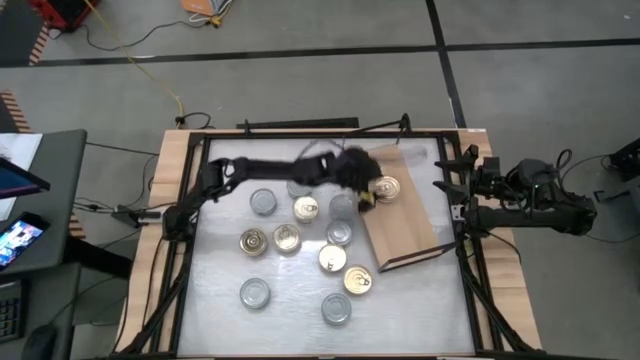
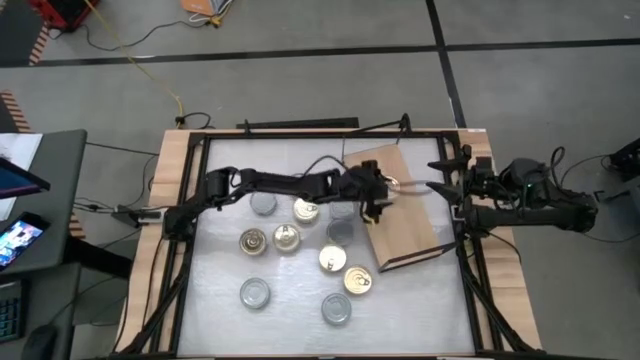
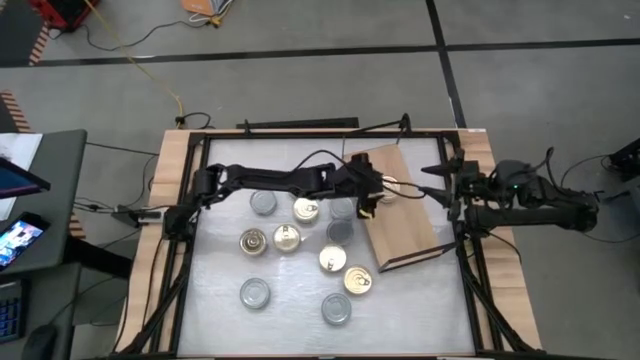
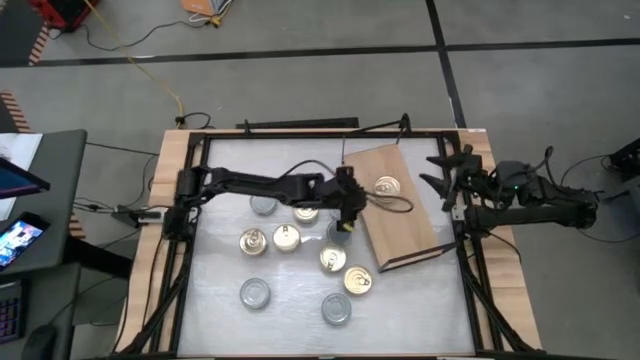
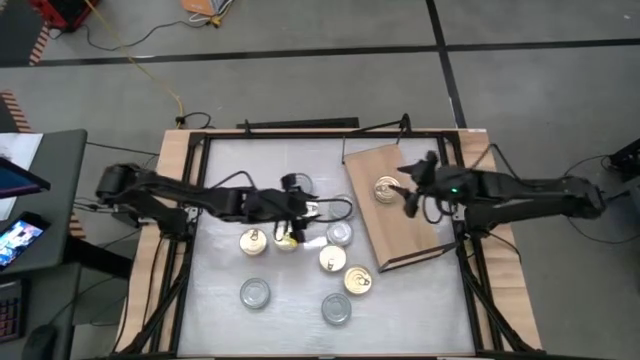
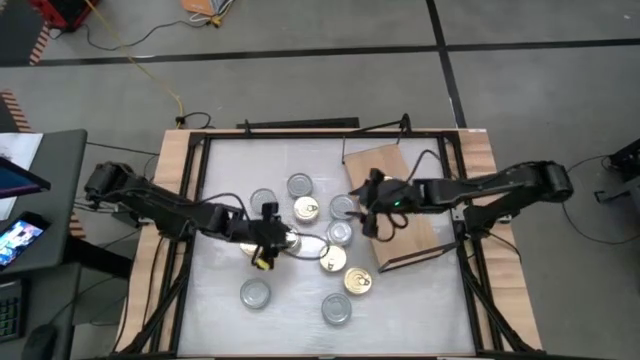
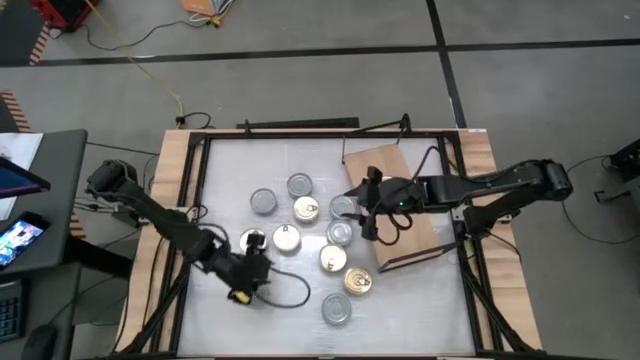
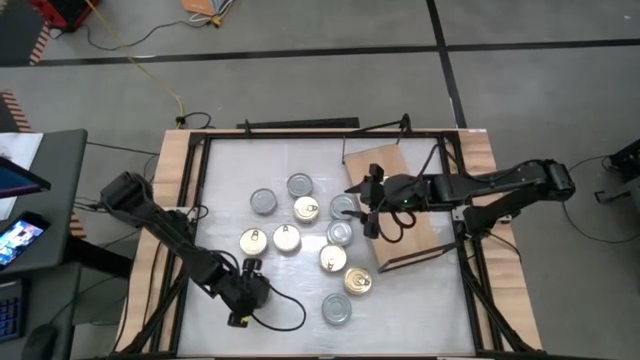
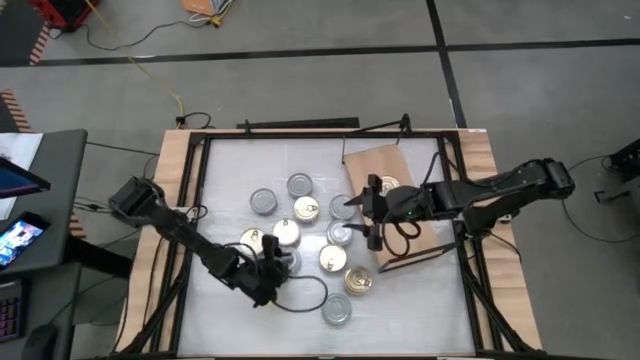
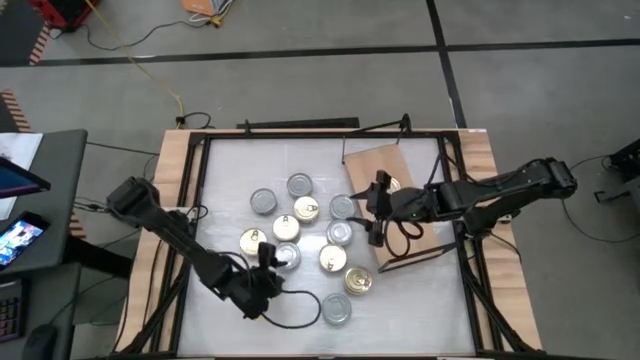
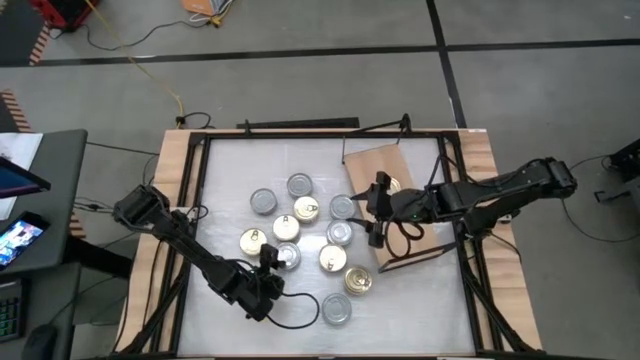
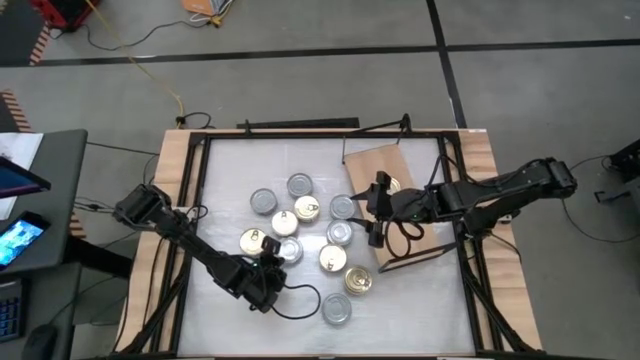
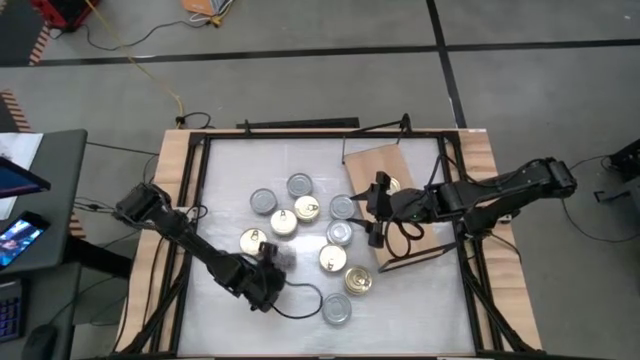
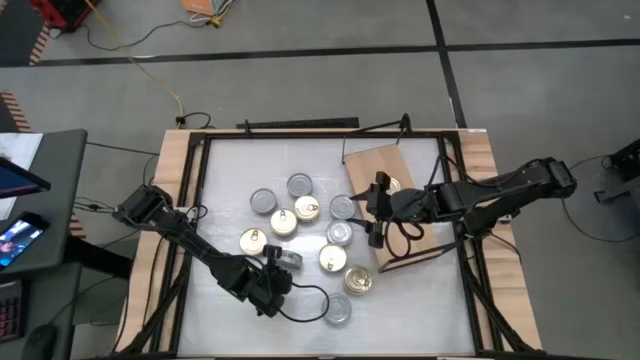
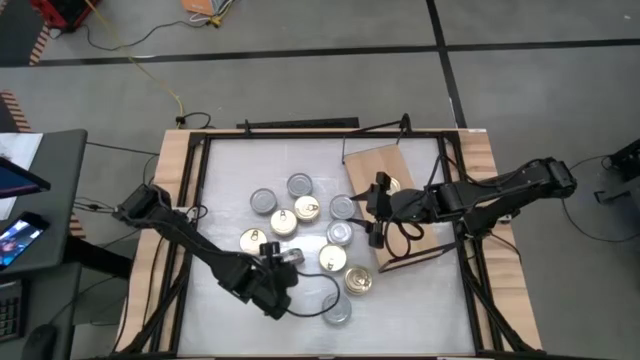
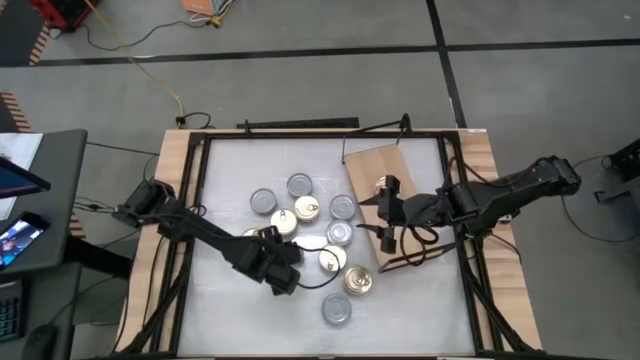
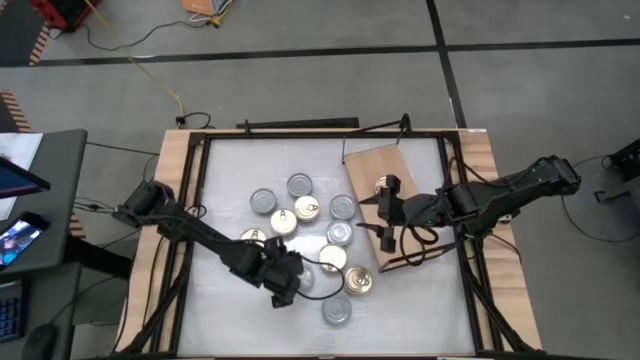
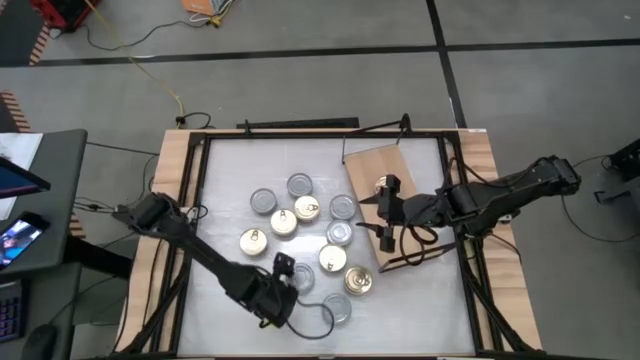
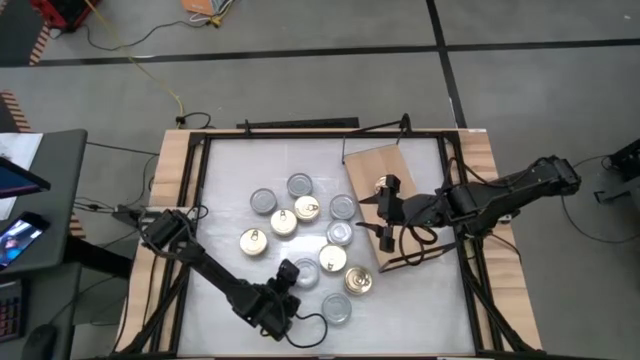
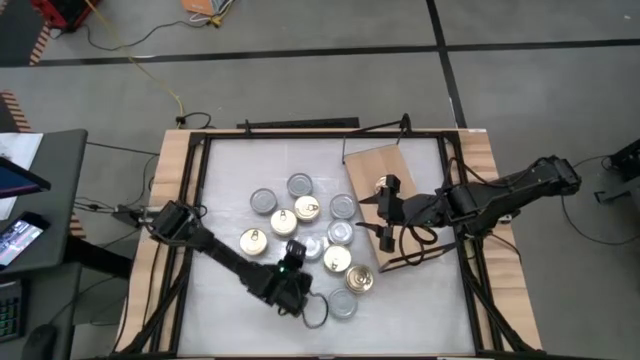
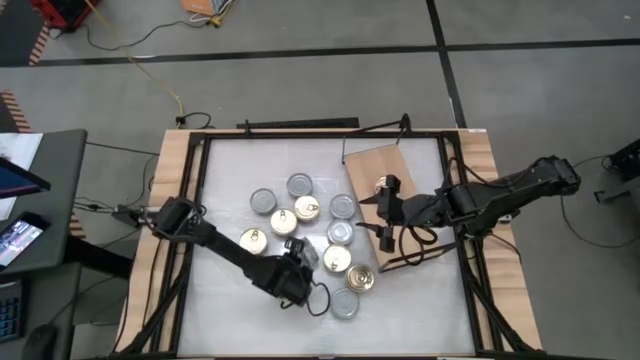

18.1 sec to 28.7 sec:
Task: Stack canned seafood by type on shelf
Put the green tuna can on the shelf

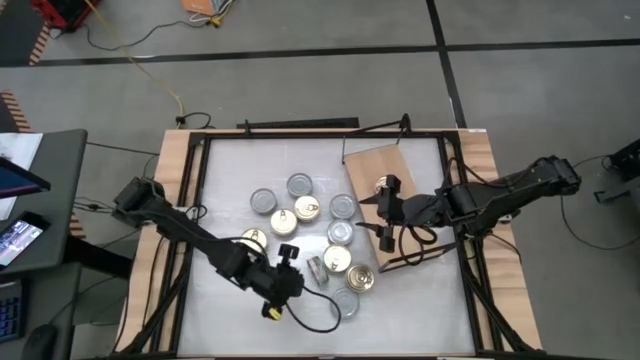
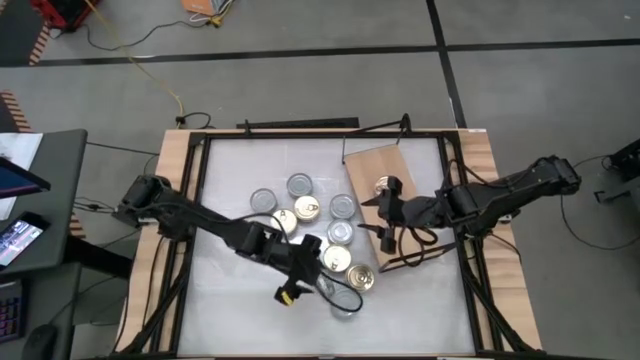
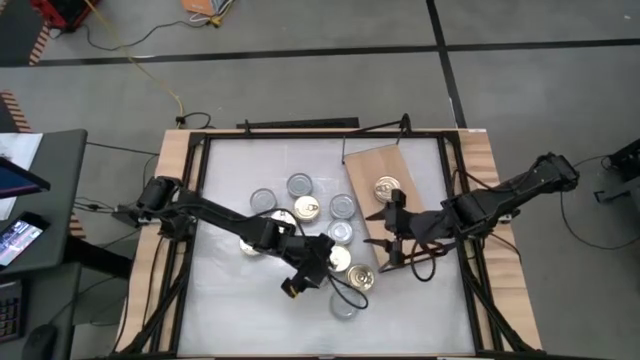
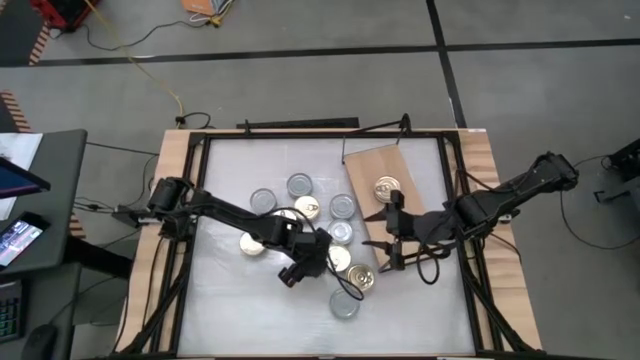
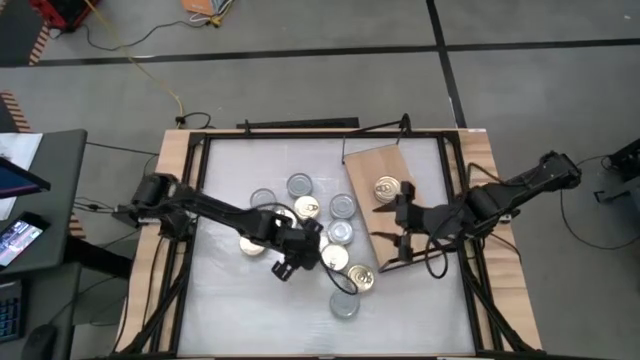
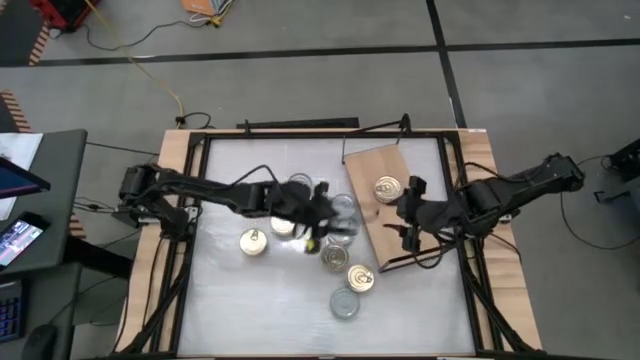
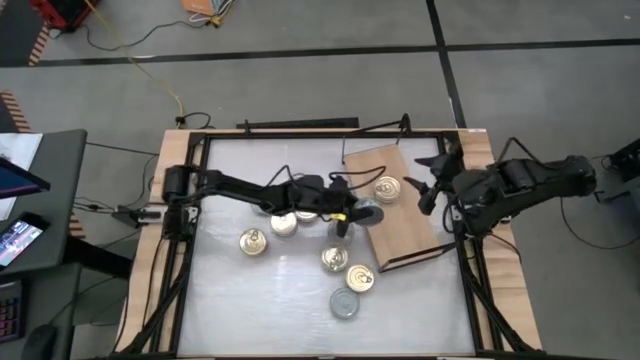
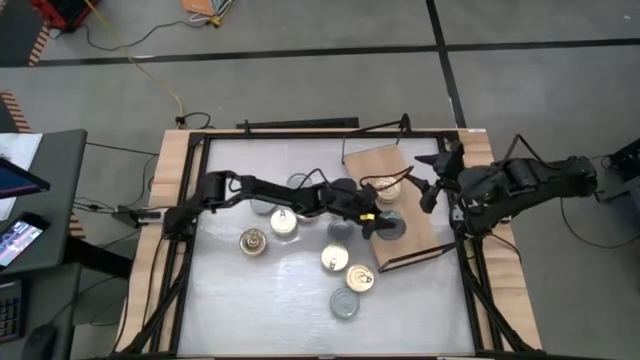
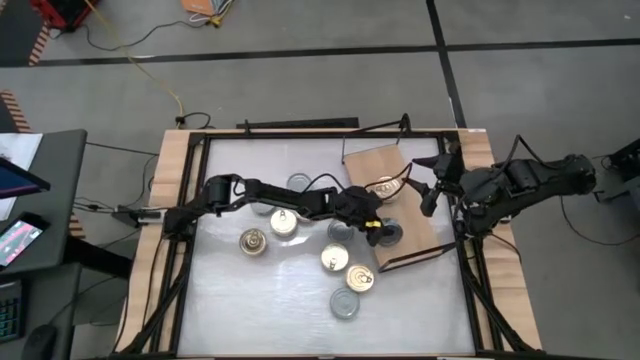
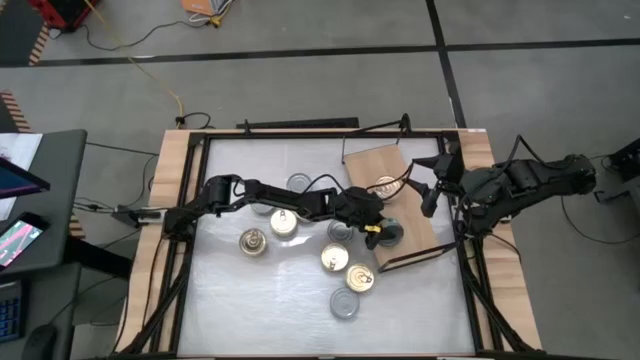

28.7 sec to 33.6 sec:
Put the green tuna can on the shelf

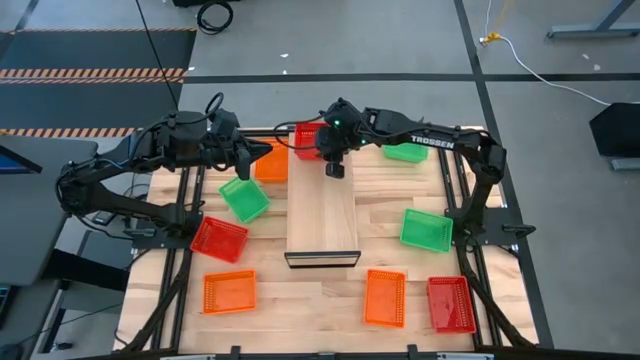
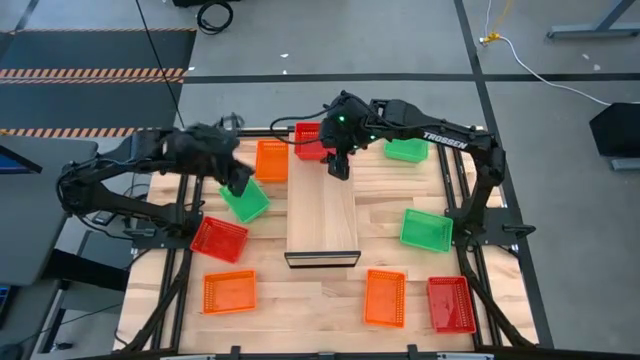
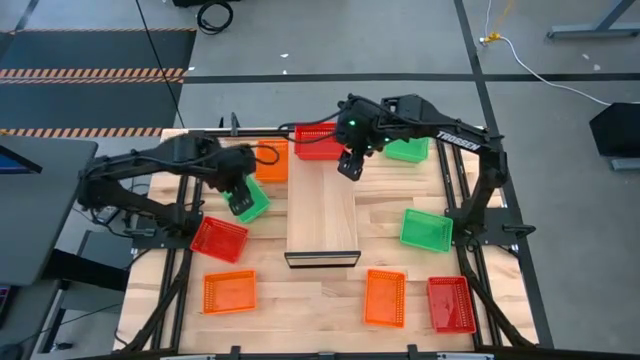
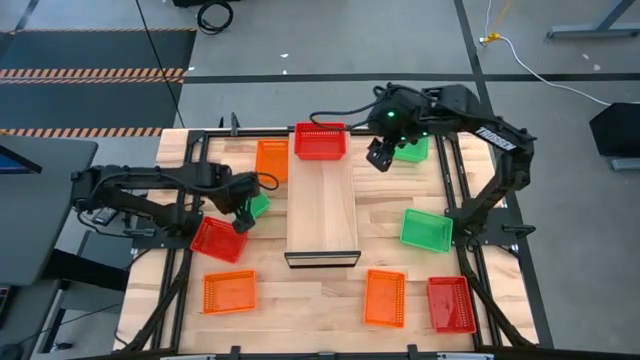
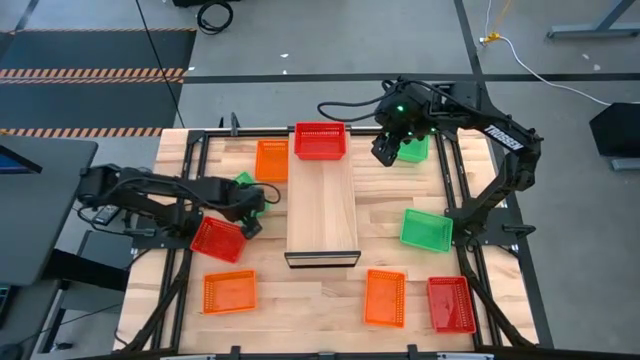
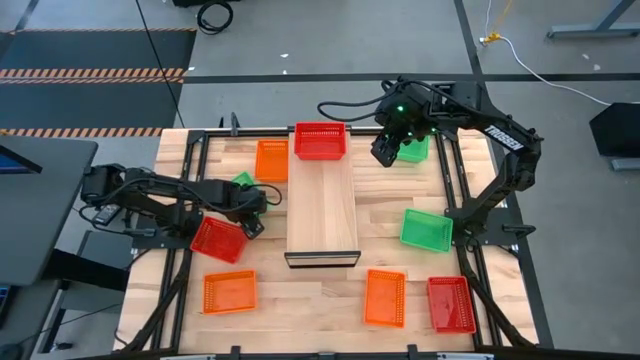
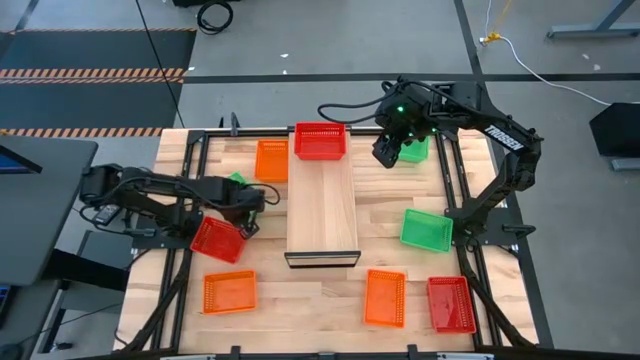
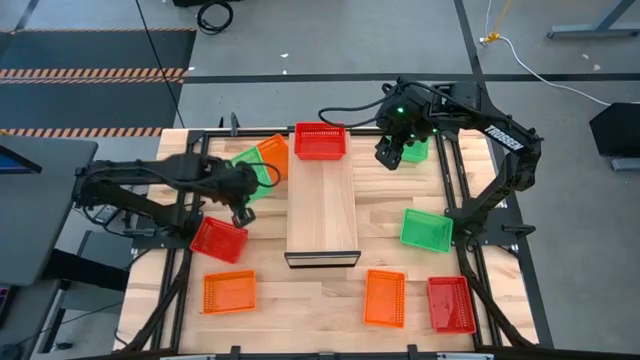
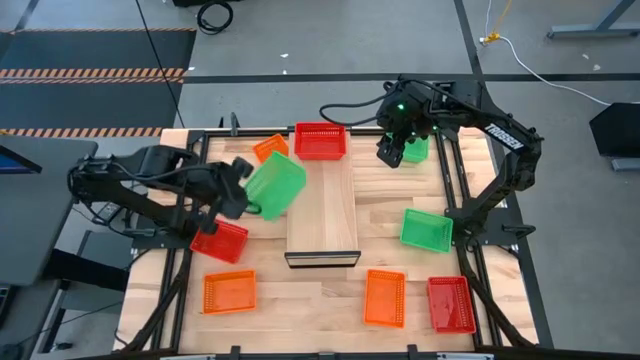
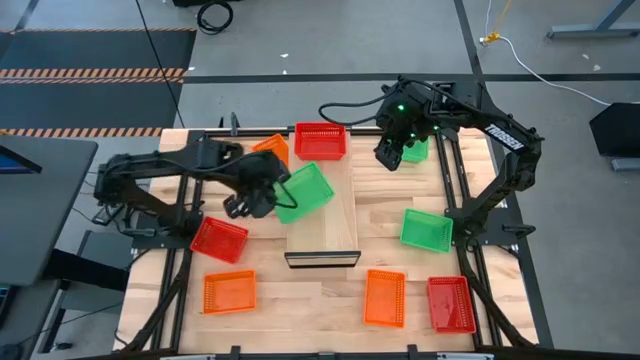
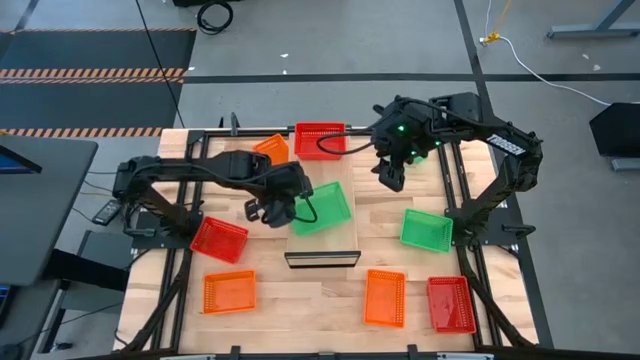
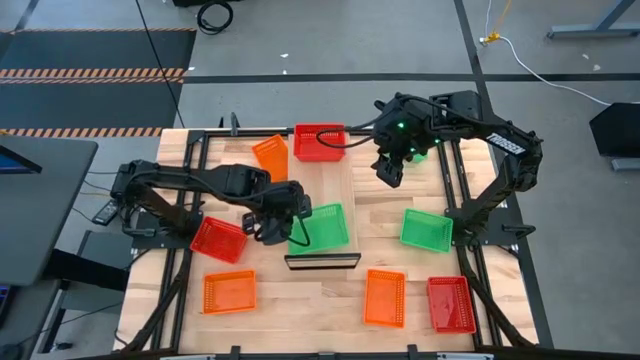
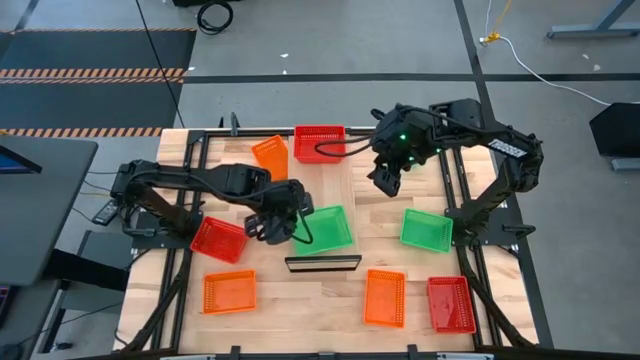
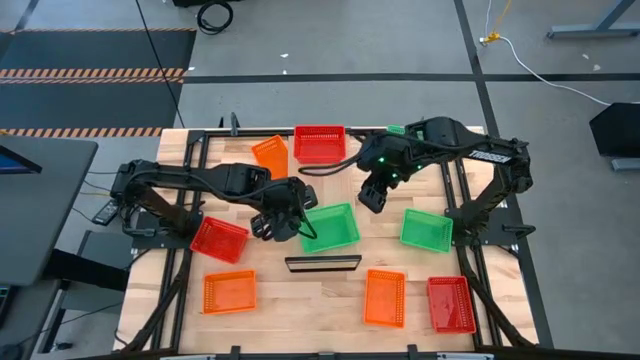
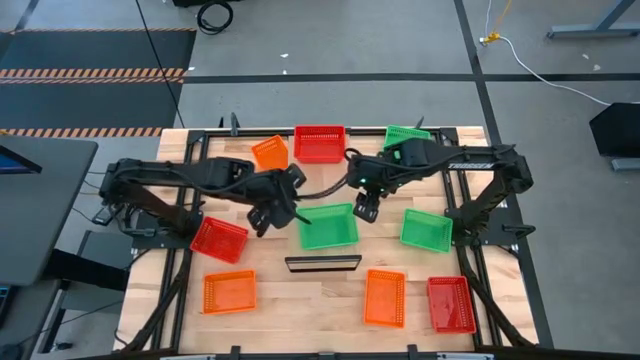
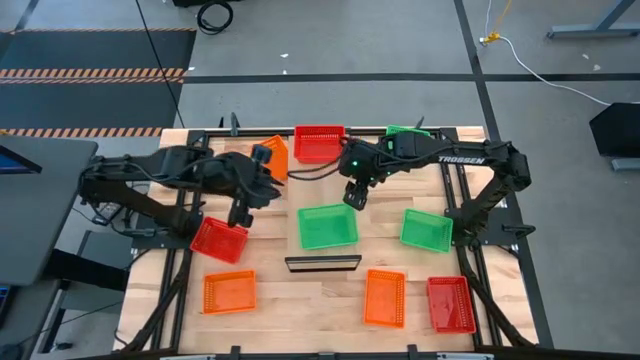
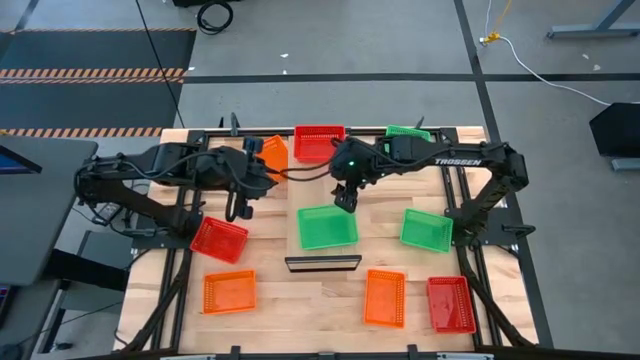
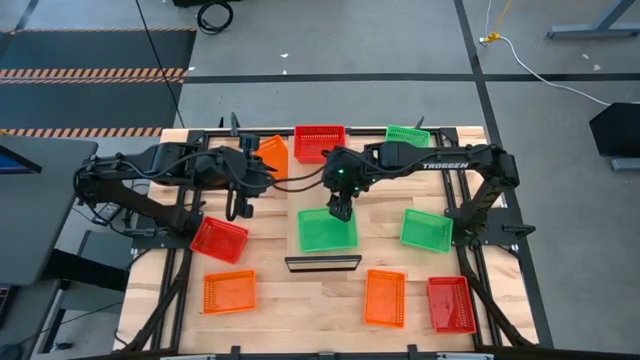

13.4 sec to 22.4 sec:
Task: Stack baskets on shelf by color
Put the middle left green basket on the shelf
